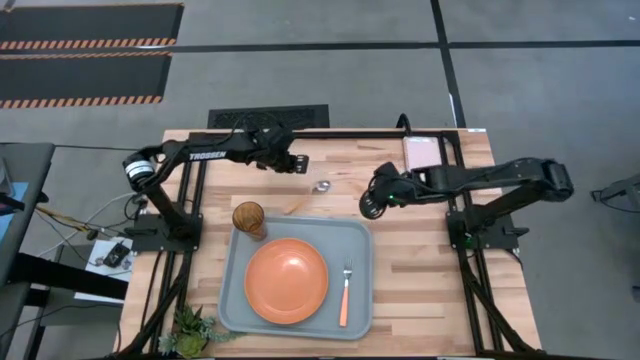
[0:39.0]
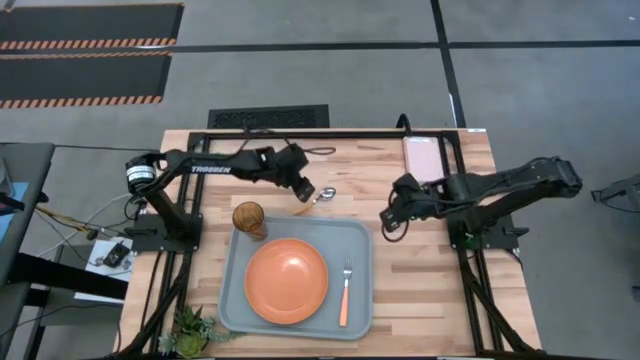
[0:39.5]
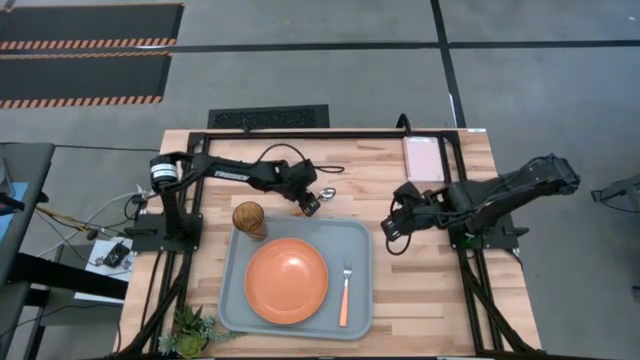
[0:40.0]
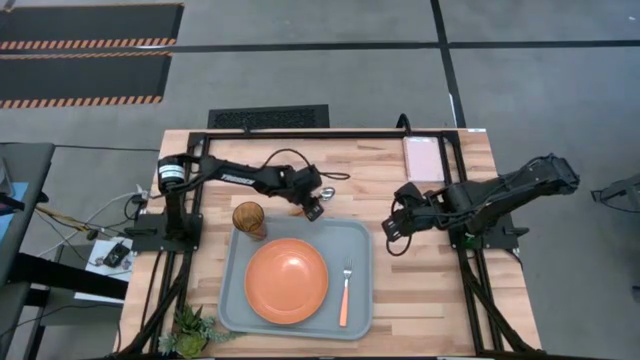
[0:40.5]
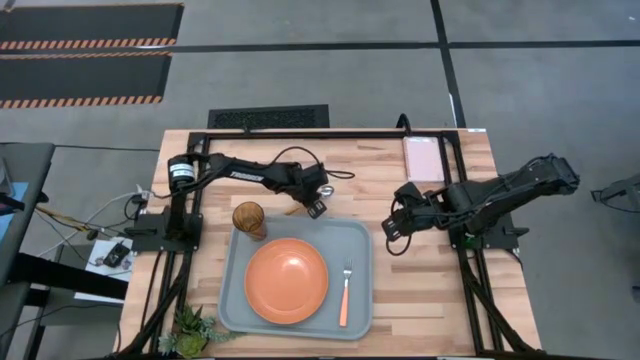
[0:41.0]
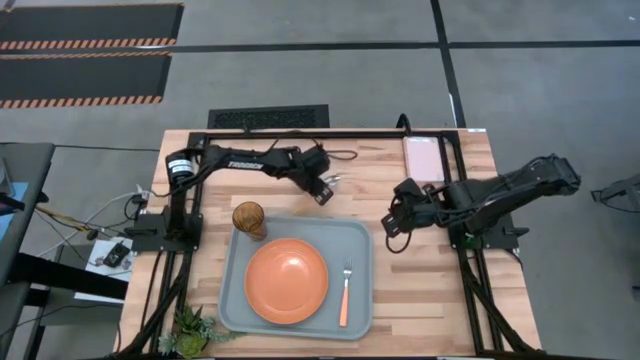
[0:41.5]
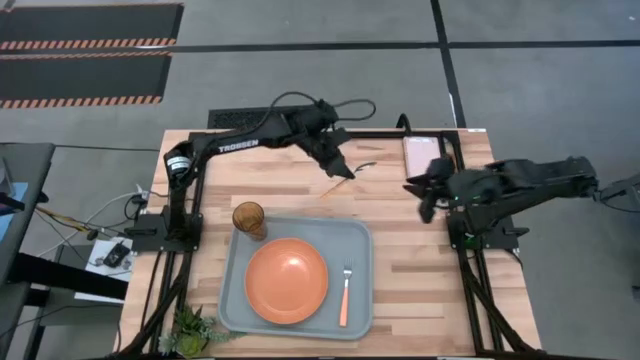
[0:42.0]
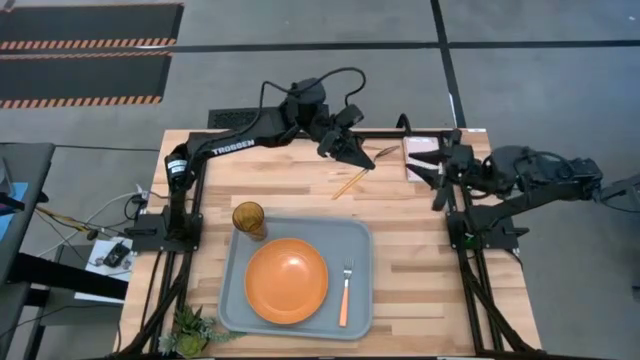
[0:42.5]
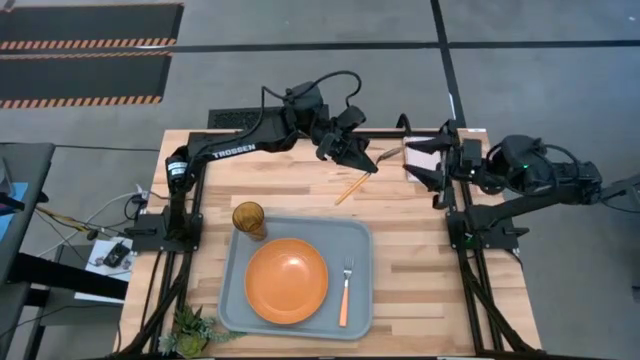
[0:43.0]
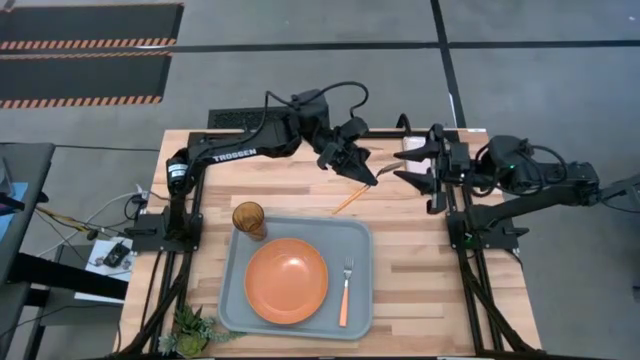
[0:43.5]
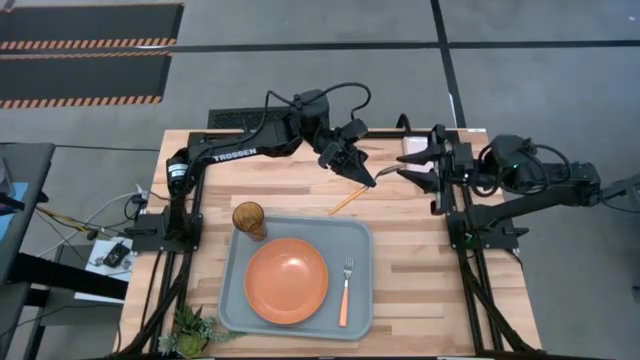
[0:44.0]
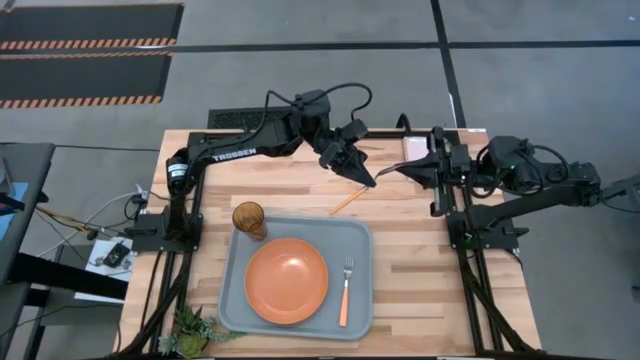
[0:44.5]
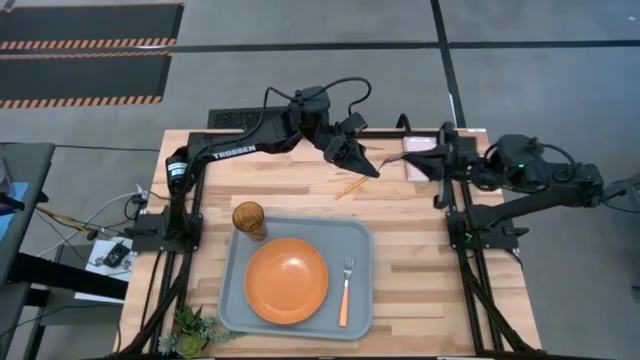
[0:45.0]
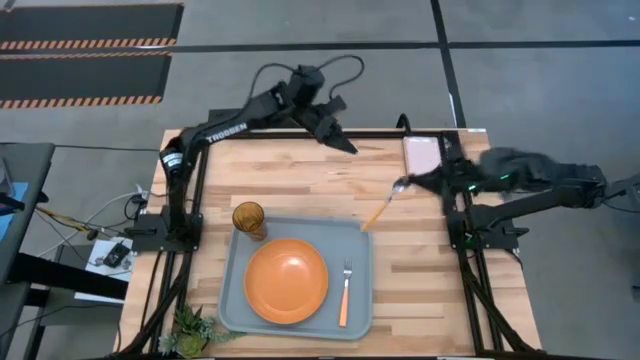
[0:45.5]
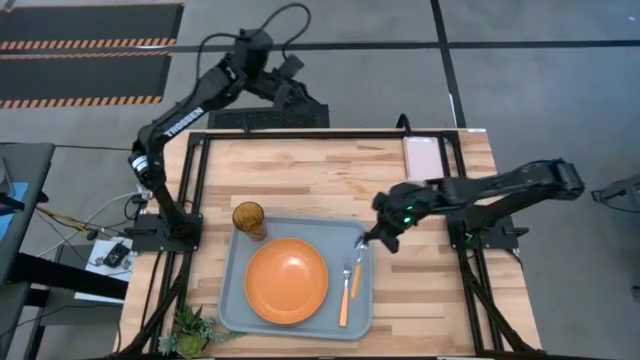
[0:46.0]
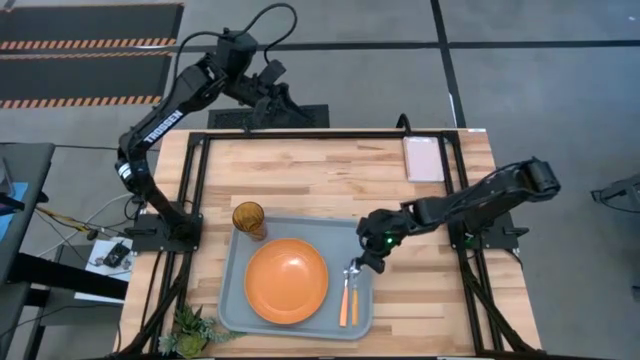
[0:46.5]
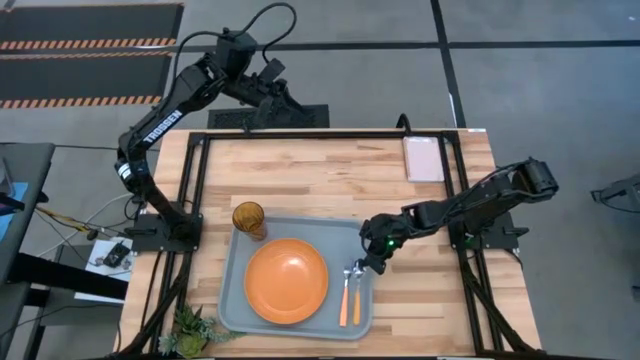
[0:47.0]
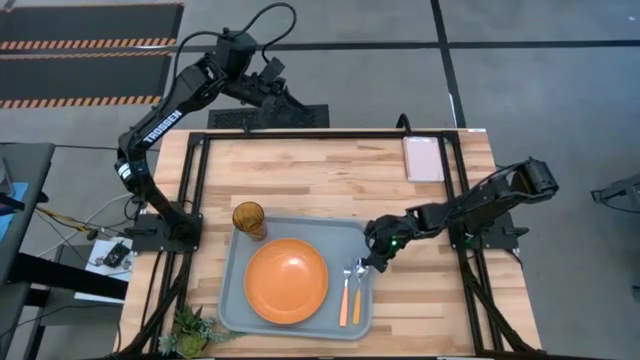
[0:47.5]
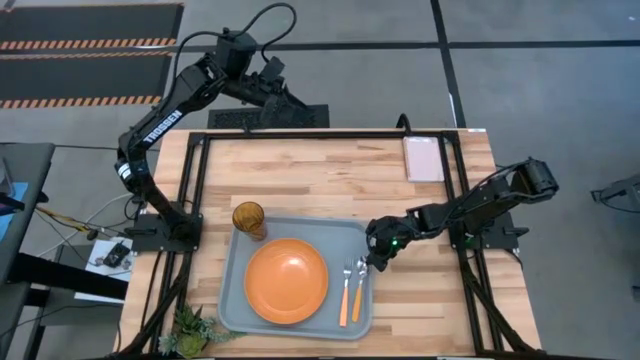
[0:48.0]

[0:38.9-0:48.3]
Task: Pick and place plate/cup/fork/spoon on tray
Put the yellow spoon on the gray serving tray to the right of the light orange fork

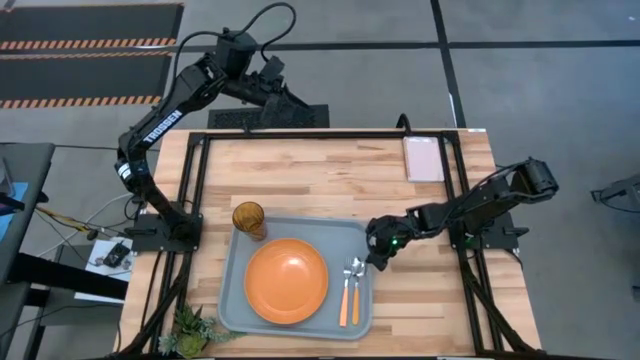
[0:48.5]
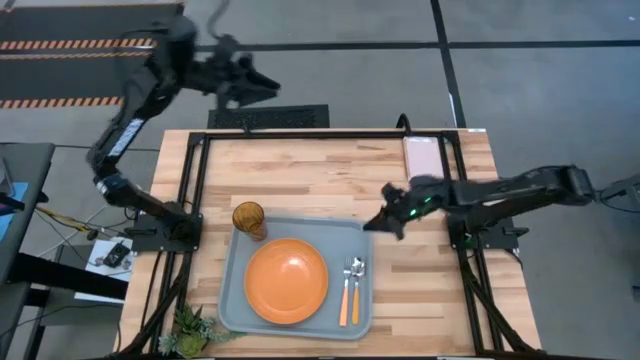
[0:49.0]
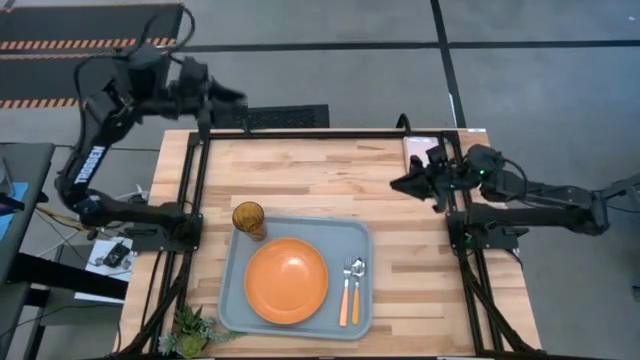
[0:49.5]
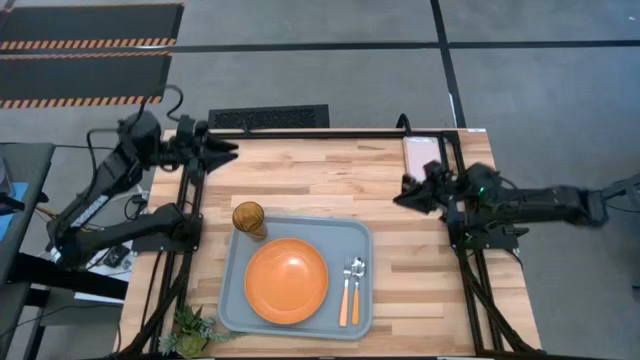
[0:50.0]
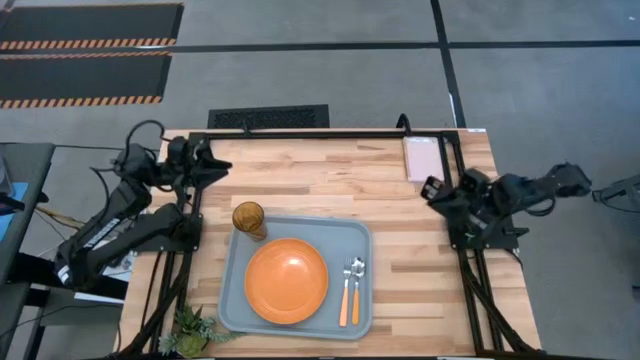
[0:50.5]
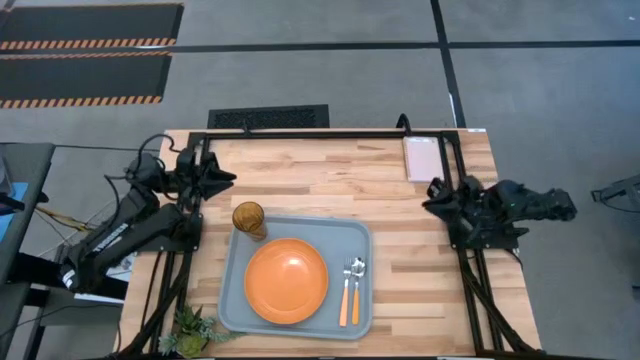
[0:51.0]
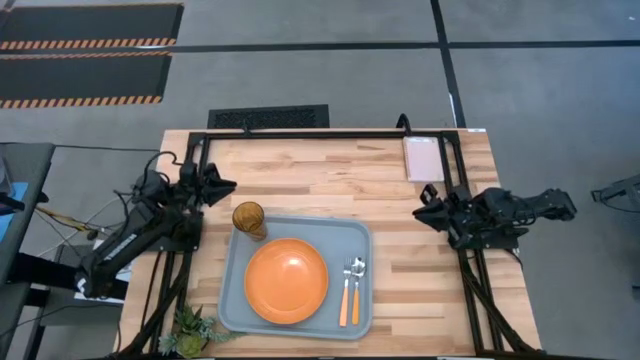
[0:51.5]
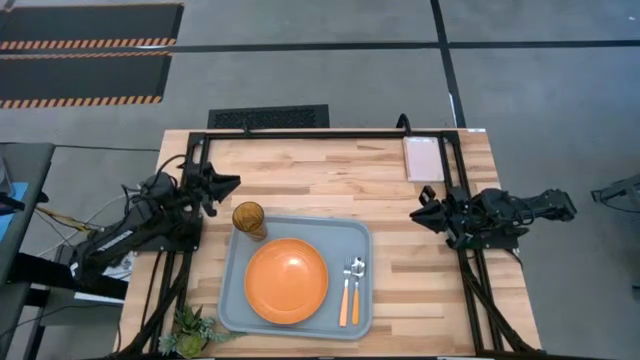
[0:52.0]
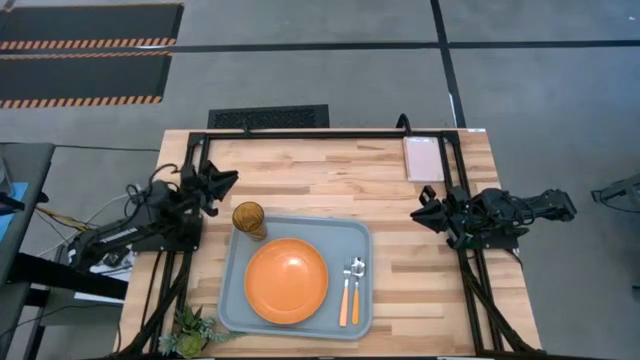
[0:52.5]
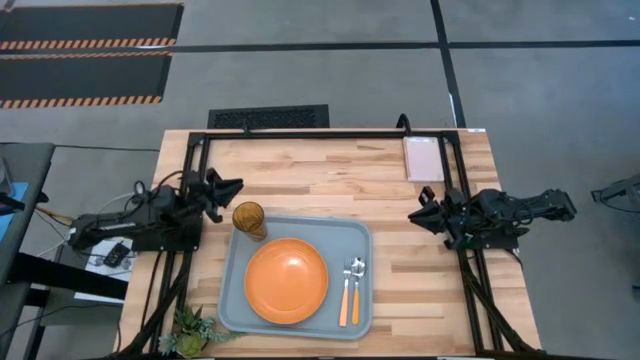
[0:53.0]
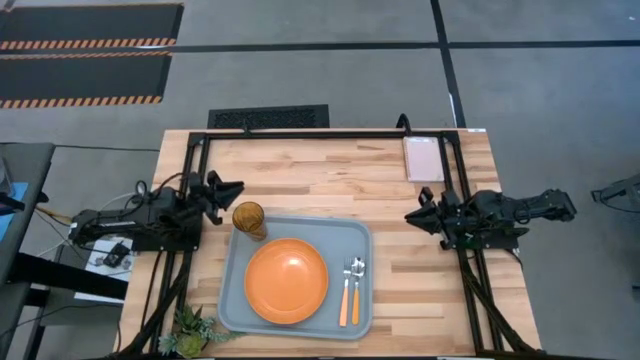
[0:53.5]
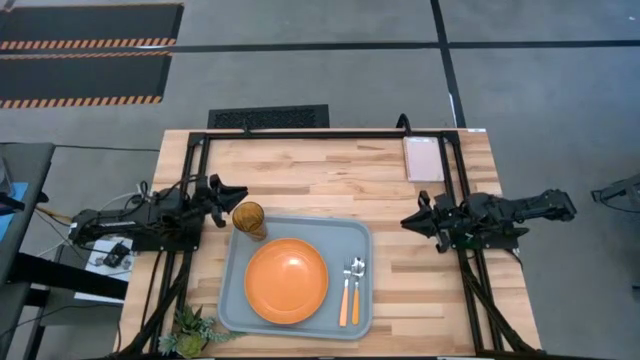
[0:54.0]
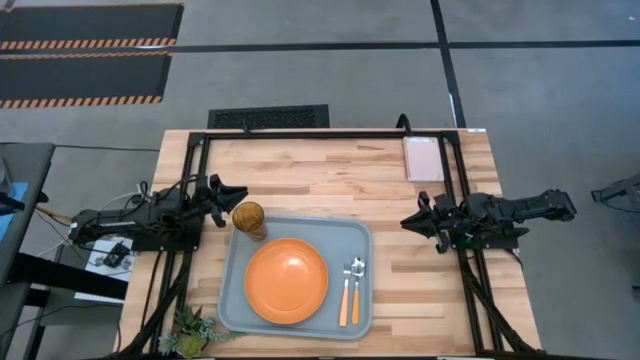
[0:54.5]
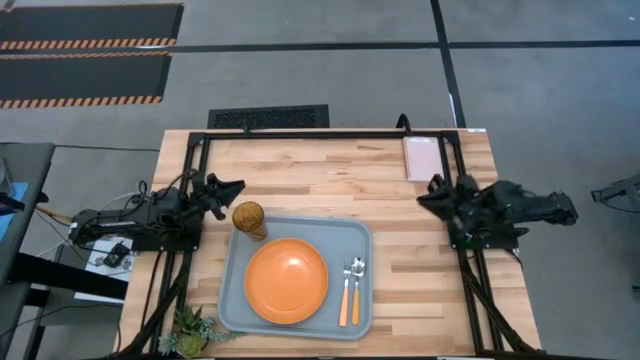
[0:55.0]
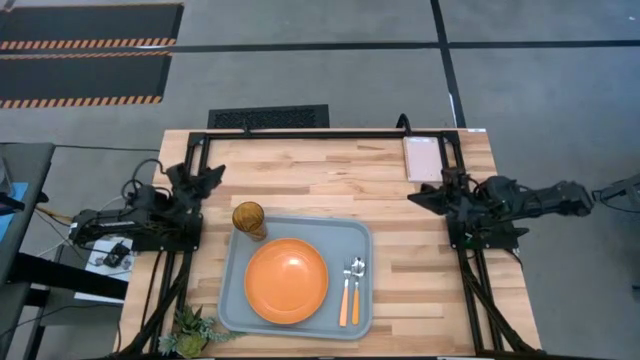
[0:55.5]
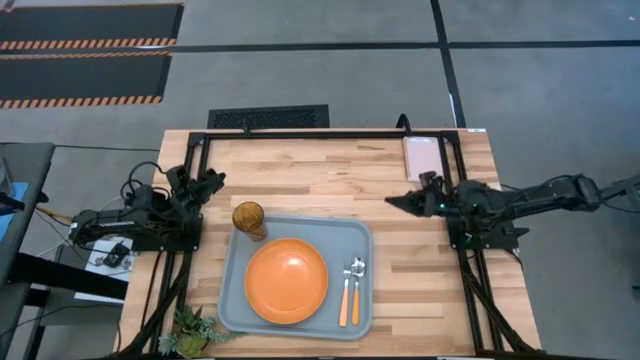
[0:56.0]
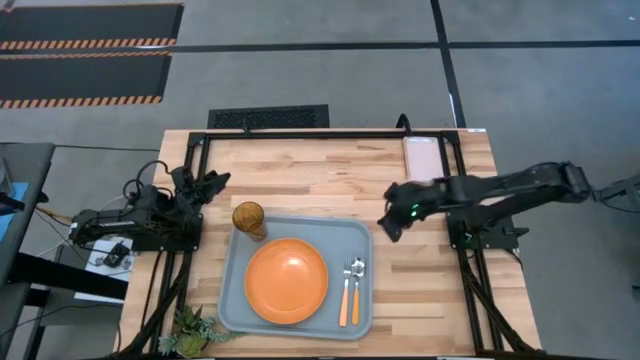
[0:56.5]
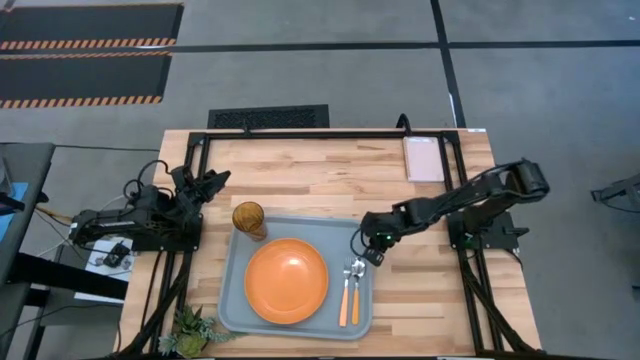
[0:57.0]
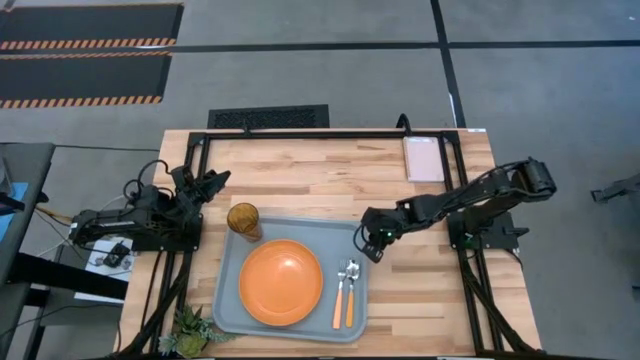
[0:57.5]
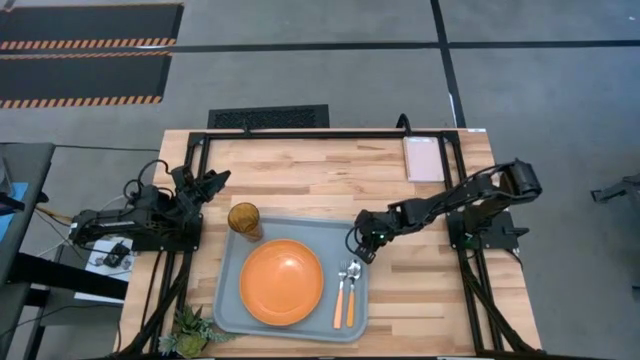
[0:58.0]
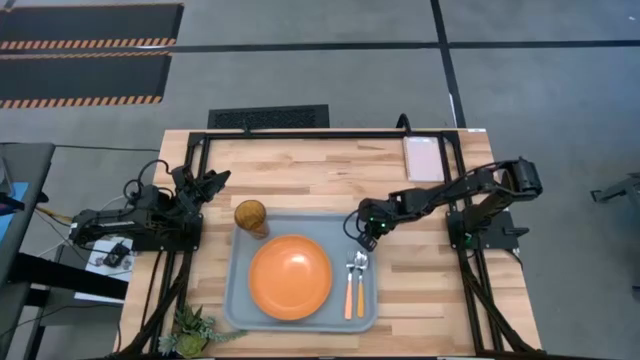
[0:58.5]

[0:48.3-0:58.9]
Adjust the gray serving tray

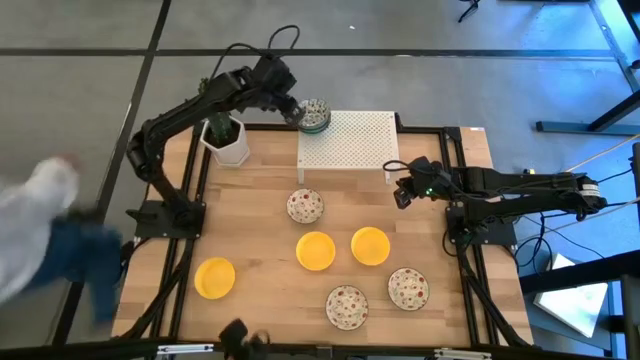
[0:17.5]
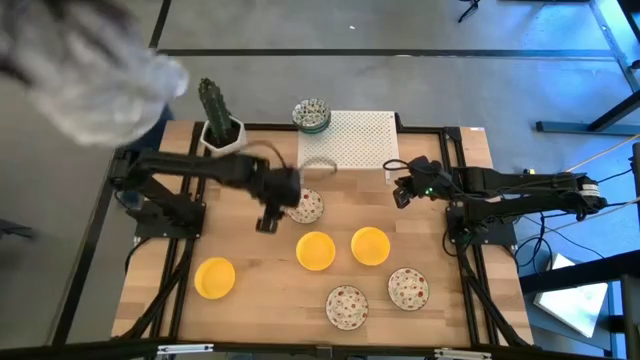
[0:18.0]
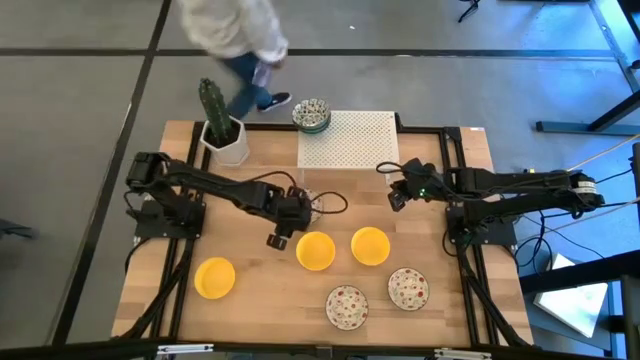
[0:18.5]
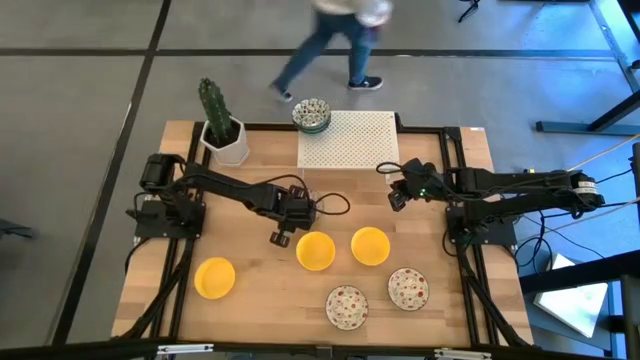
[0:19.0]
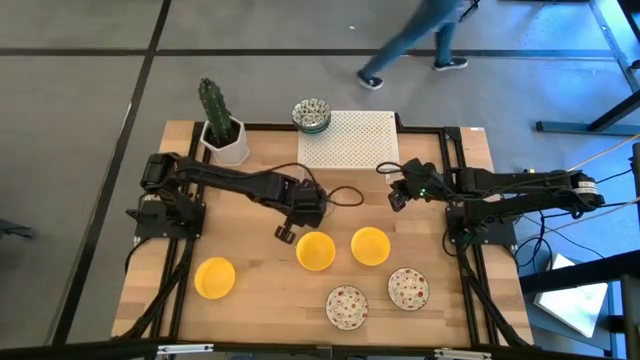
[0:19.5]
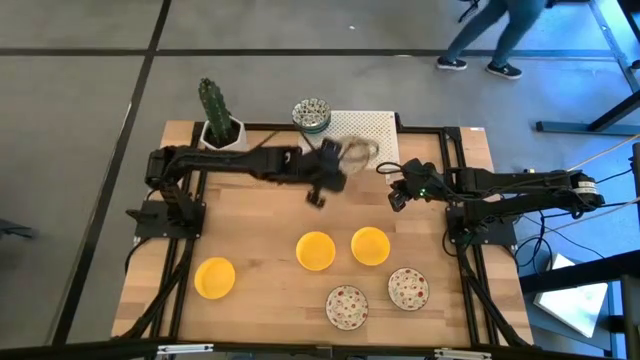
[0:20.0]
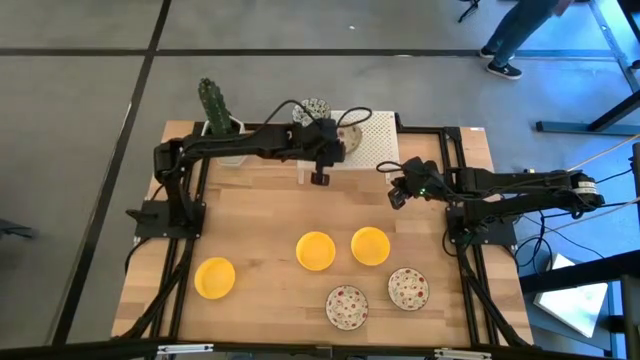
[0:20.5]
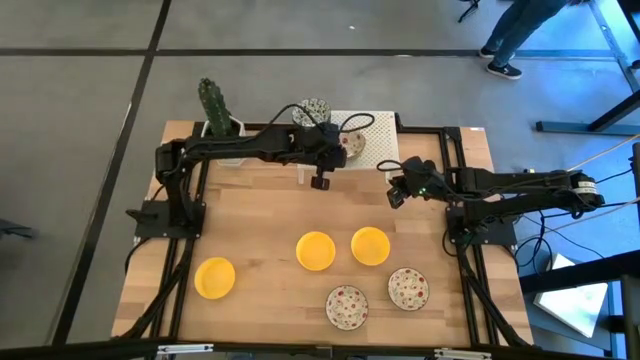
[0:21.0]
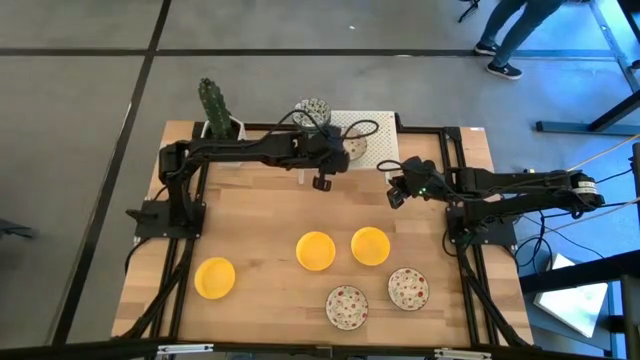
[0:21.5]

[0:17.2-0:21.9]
Task: Pick & Place Mini bowls
Put the top left red white bowl on the shelf
